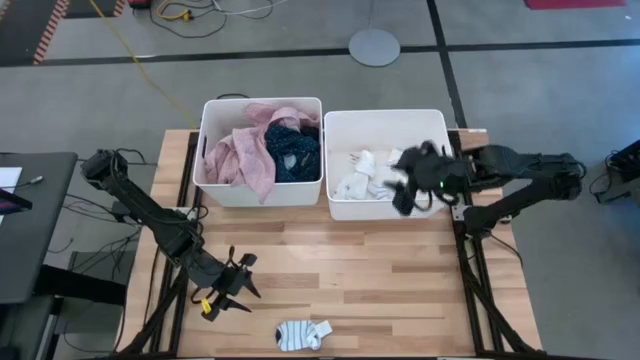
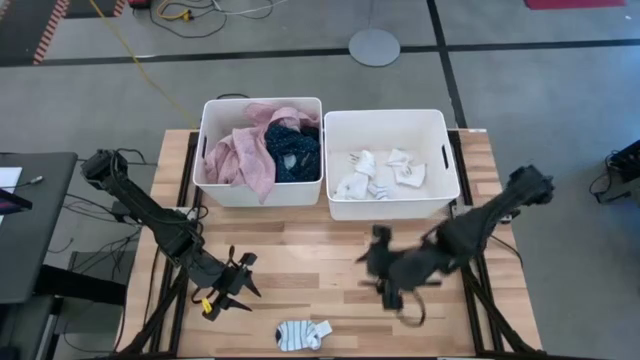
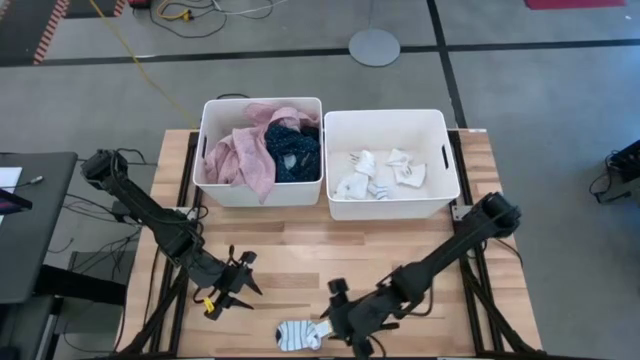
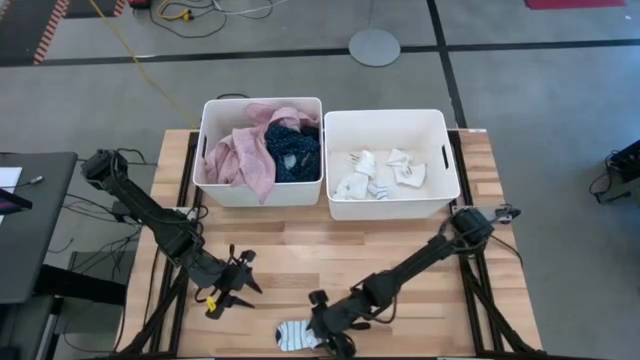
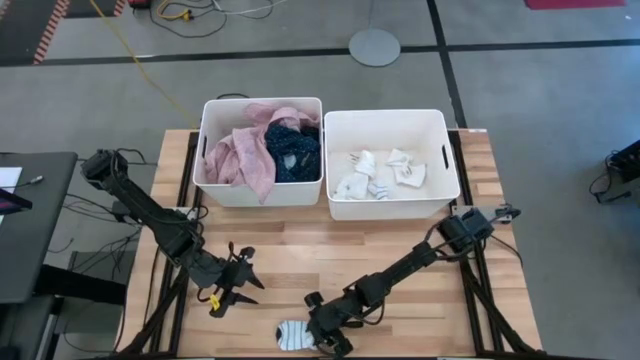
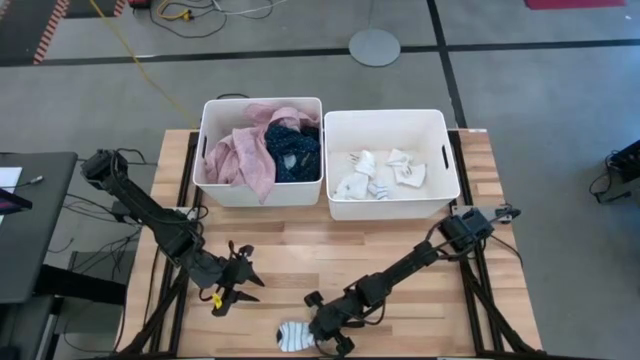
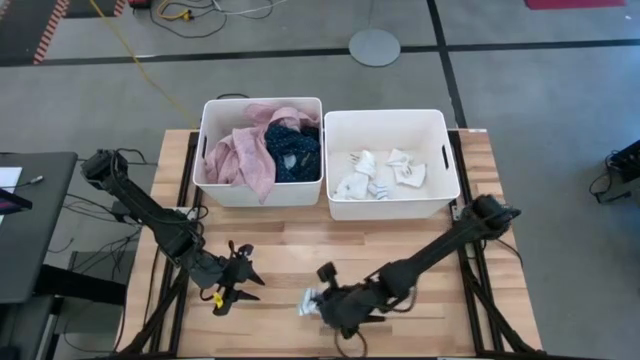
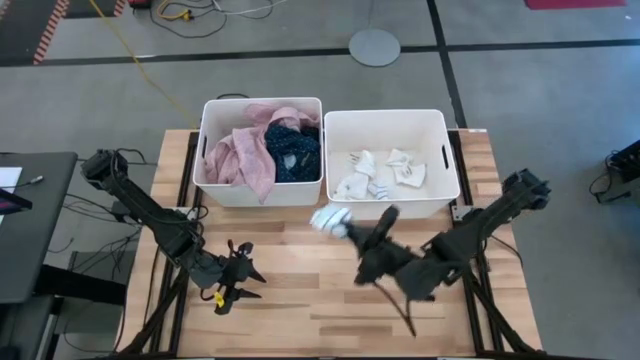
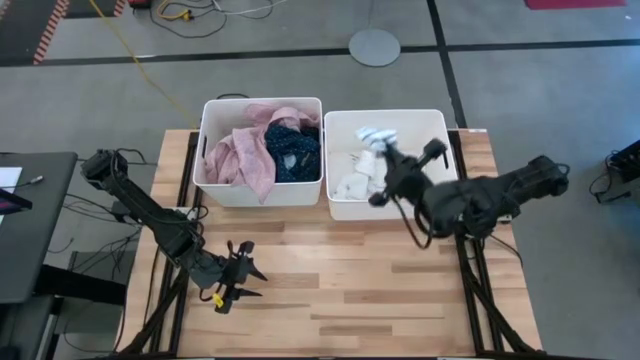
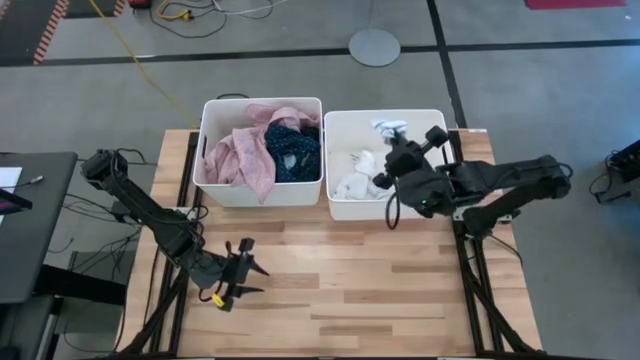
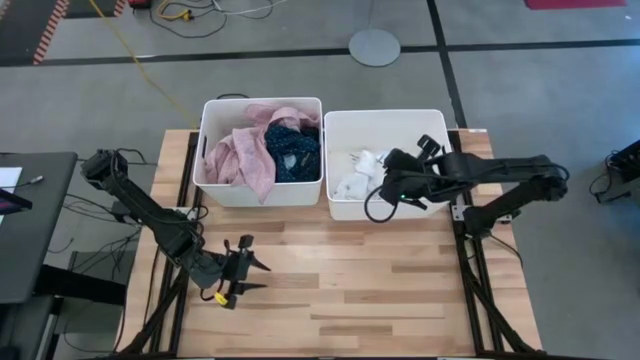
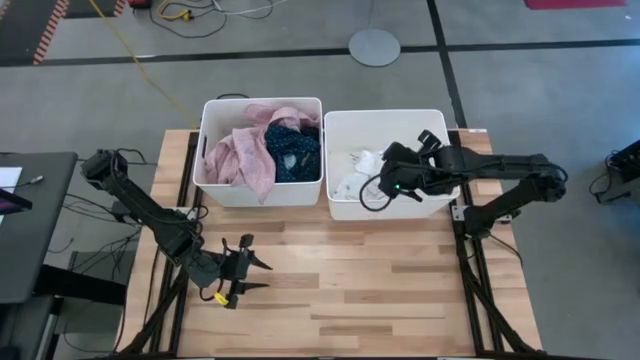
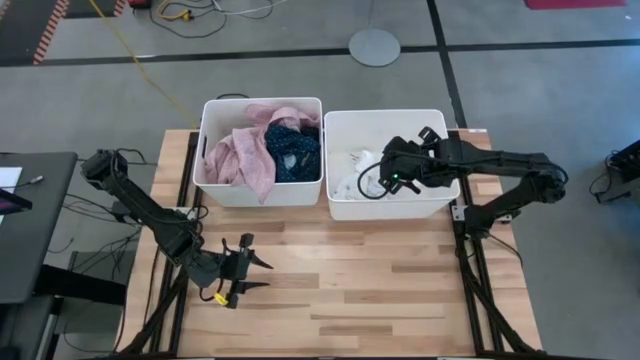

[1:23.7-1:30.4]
Task: Sort clothes
Put the blue sock into the right white laundry organizer

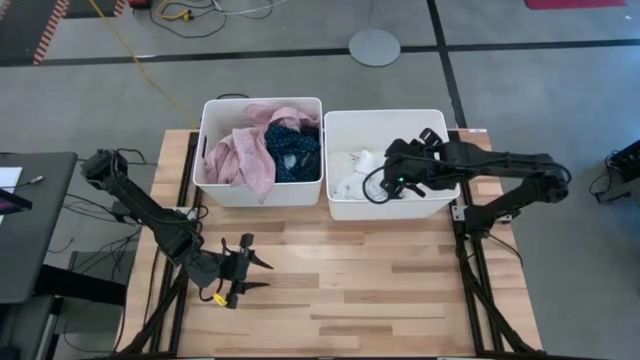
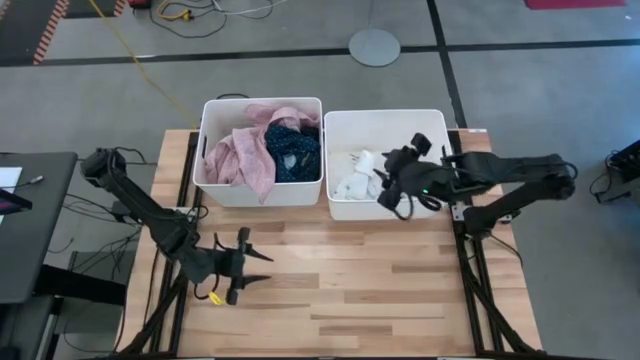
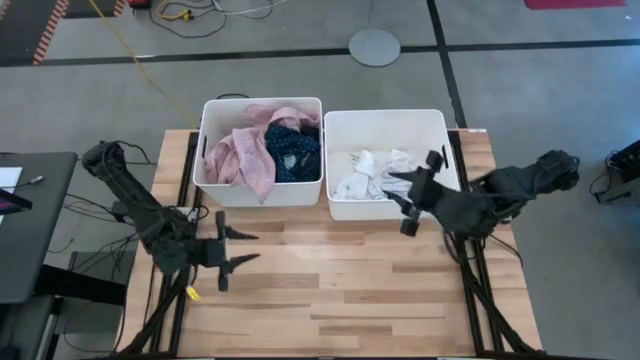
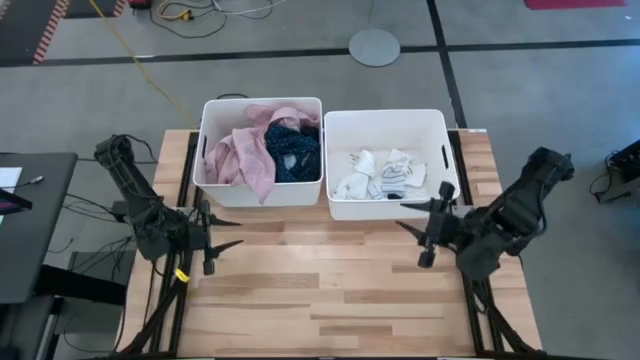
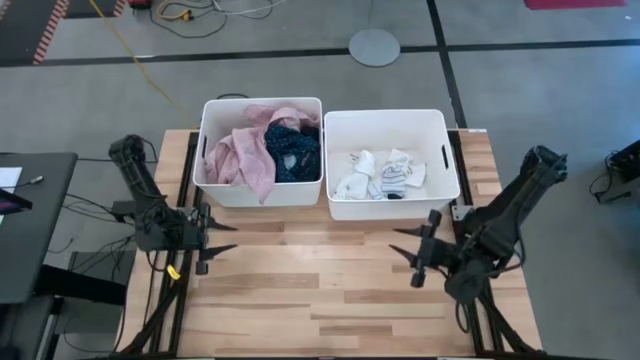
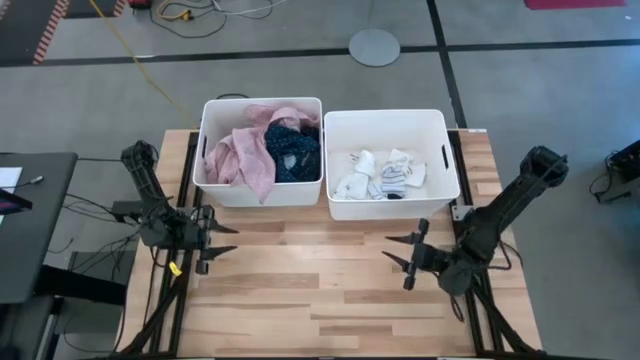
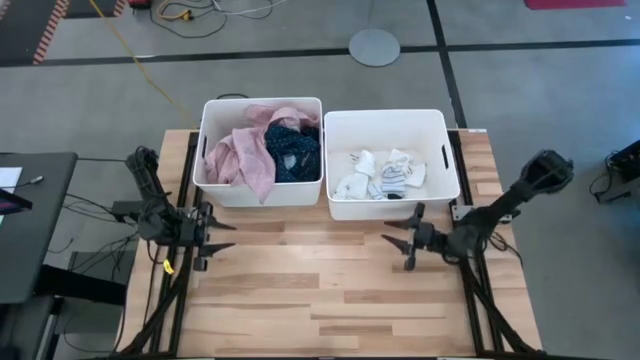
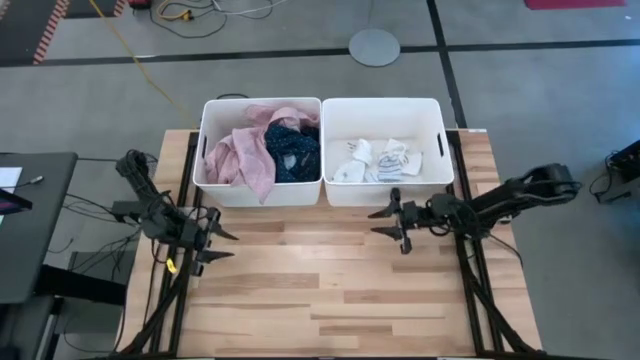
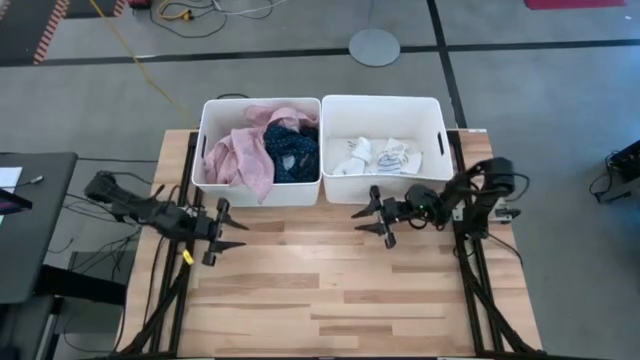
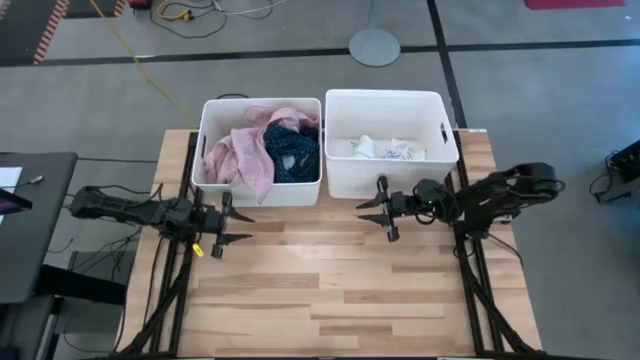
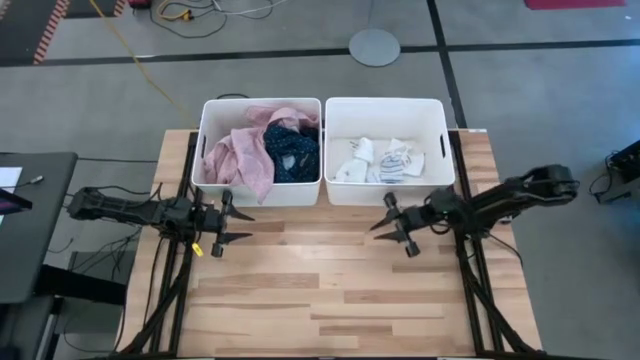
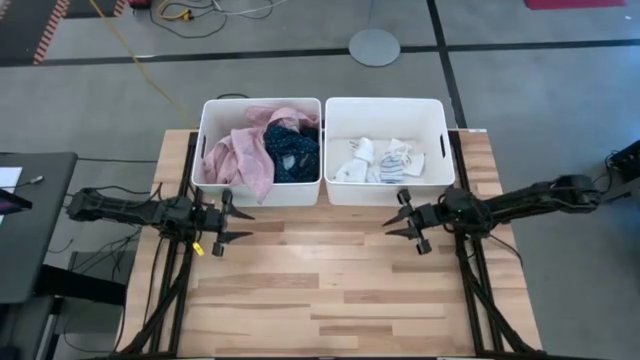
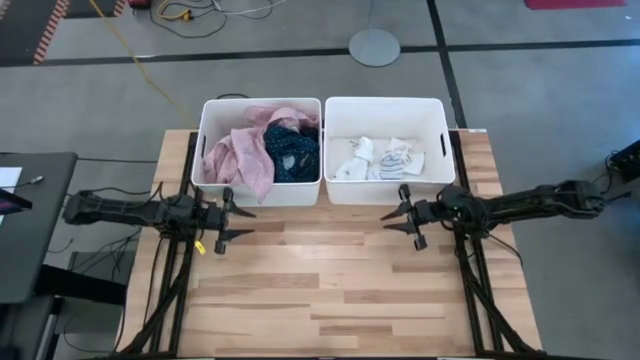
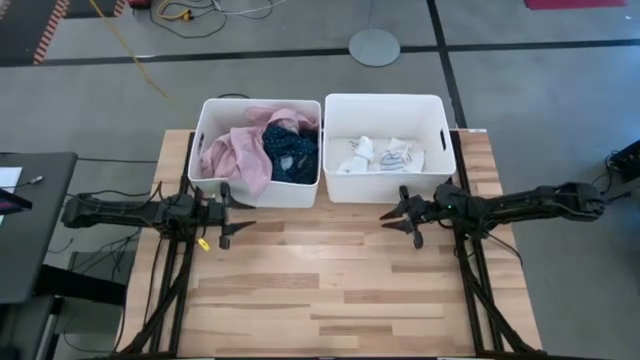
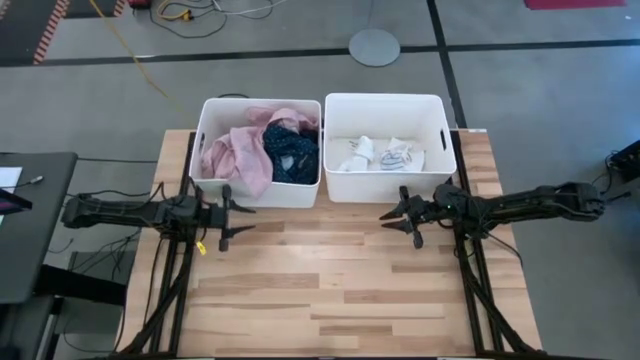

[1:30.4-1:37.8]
Adjust the white laundry organizers

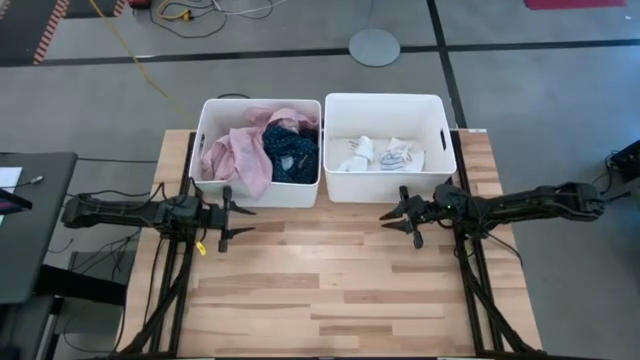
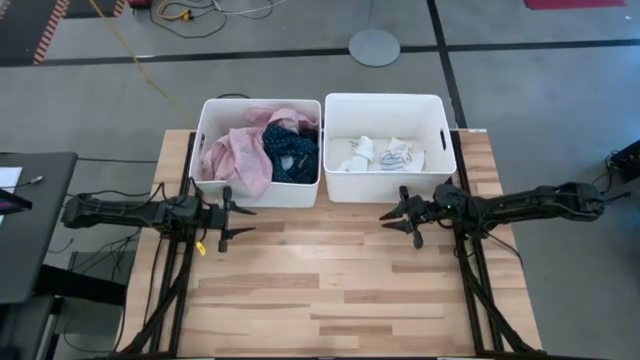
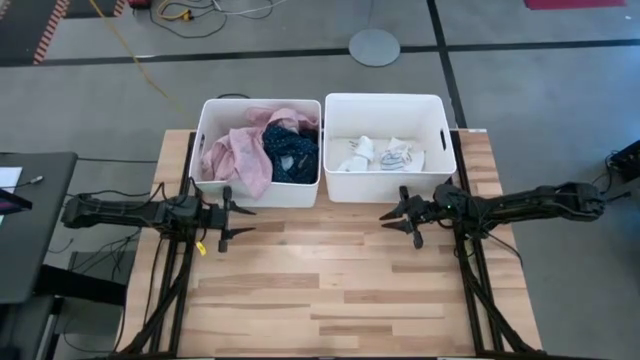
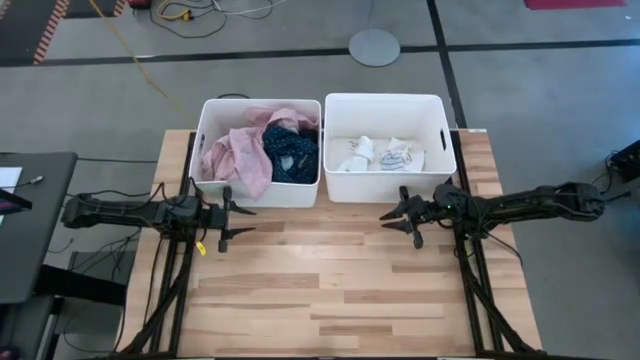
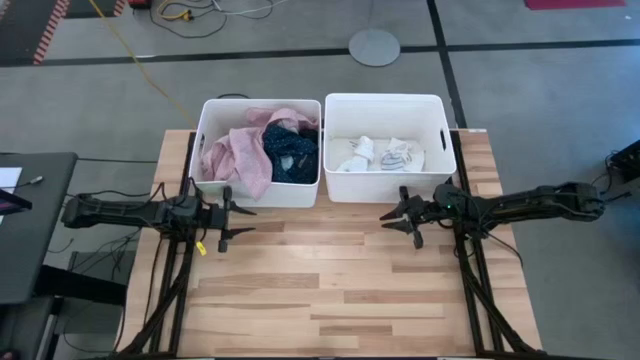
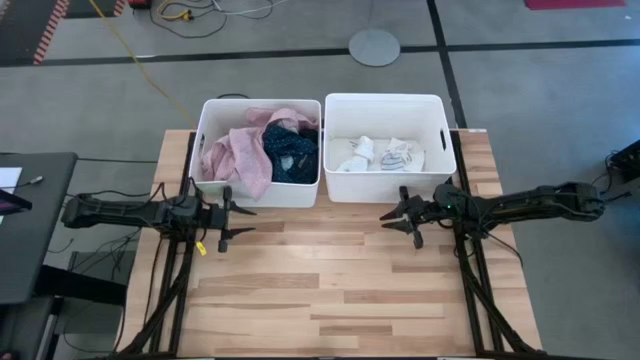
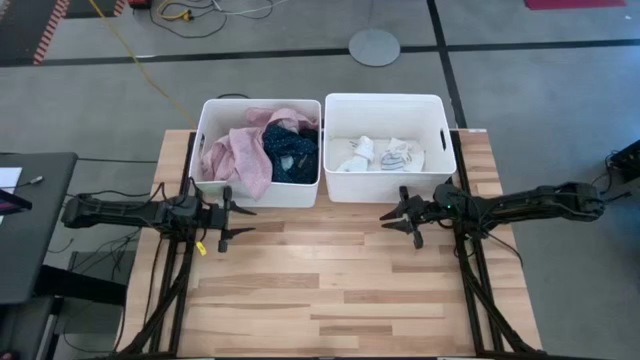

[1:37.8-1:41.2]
Return to Home Position

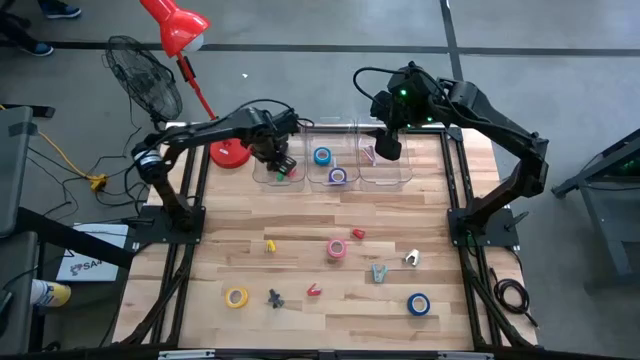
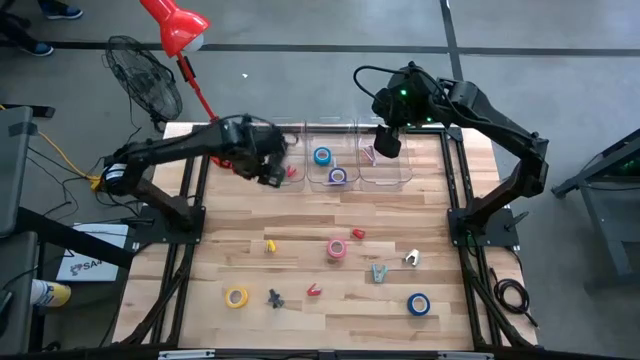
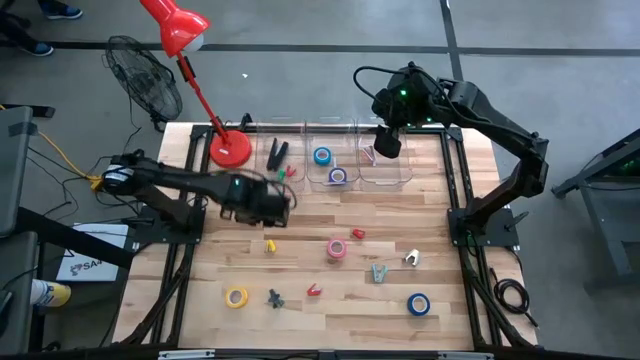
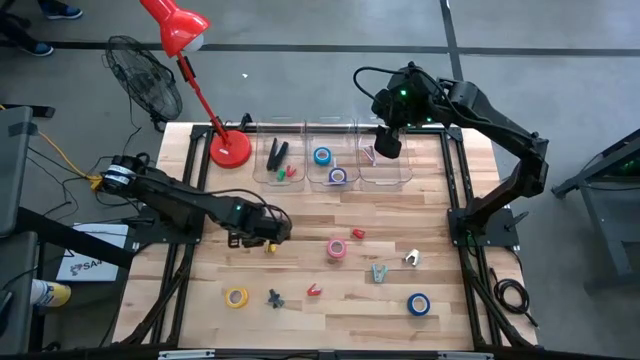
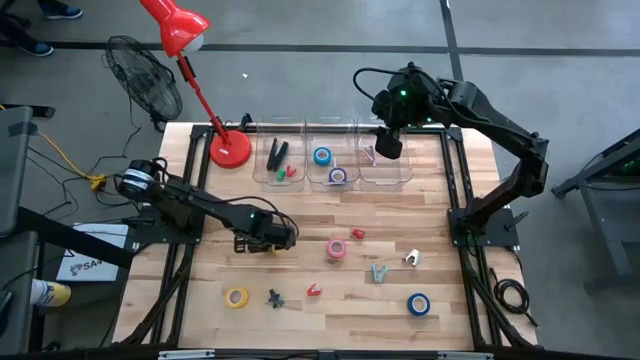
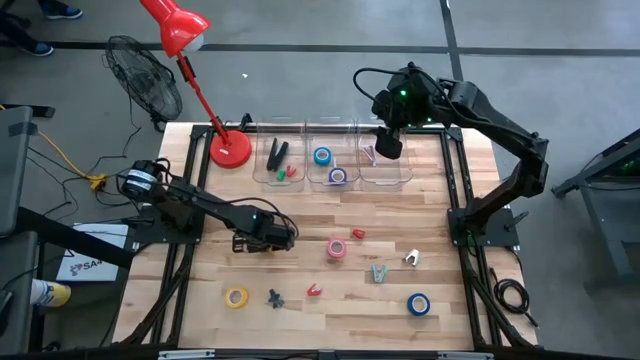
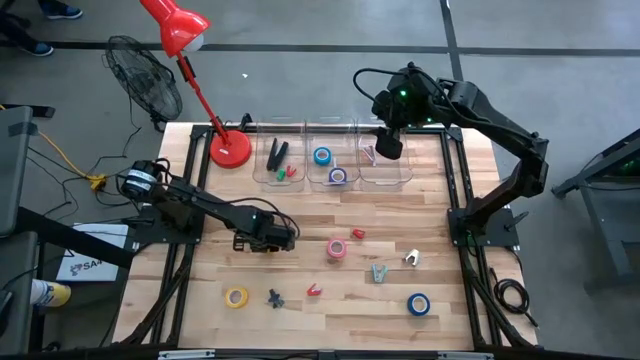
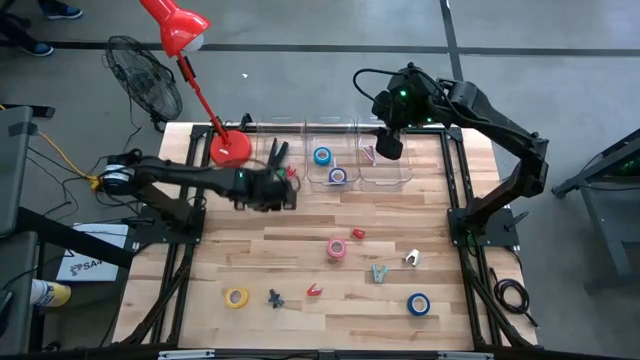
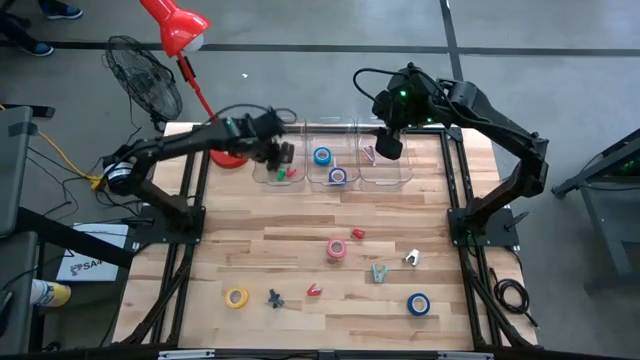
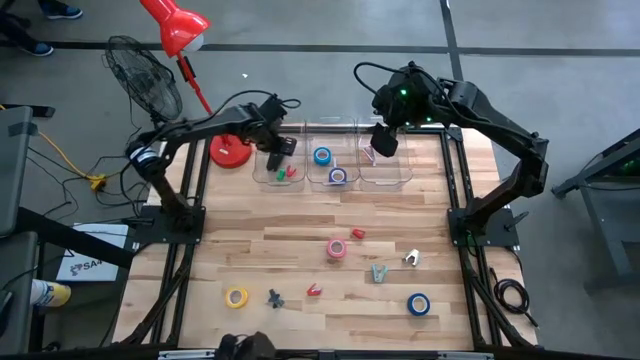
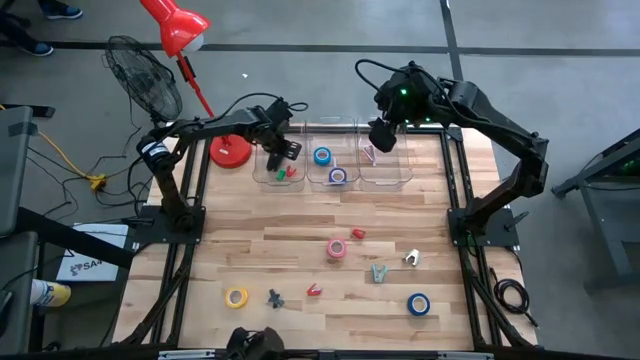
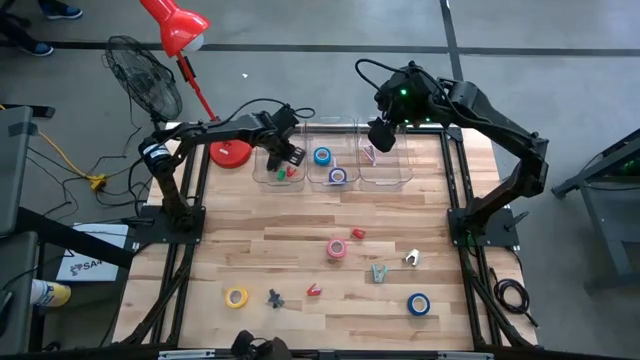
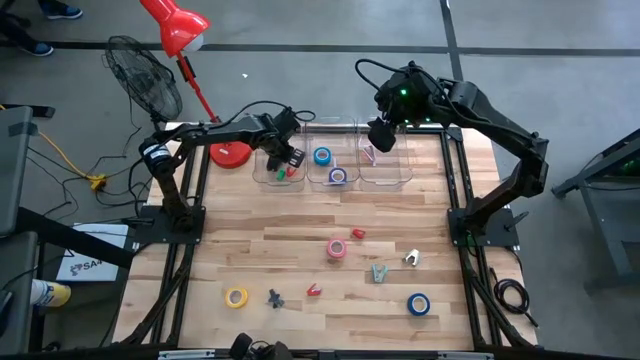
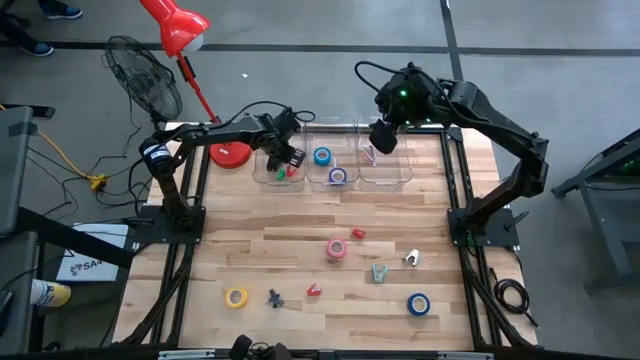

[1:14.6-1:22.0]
Task: Pick and place Stapler, Stapler remover, tape
Put the yellow stapler into the left transparent bin
